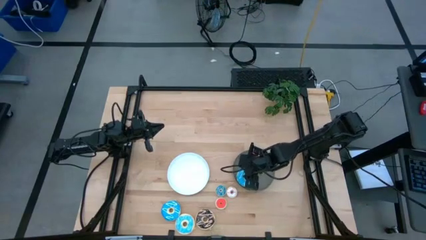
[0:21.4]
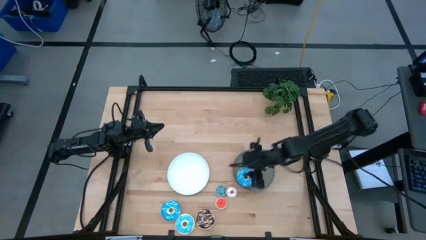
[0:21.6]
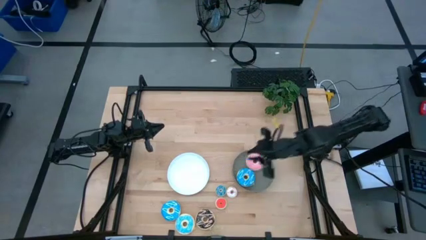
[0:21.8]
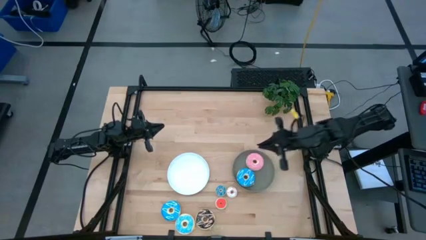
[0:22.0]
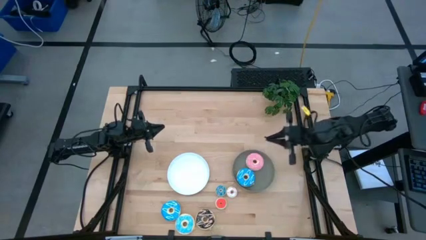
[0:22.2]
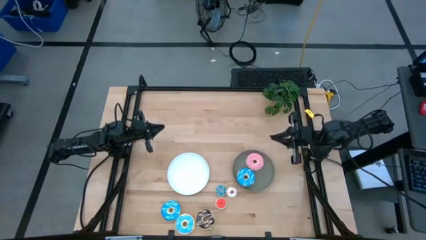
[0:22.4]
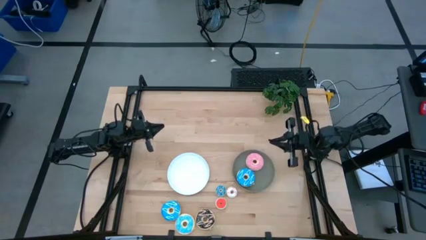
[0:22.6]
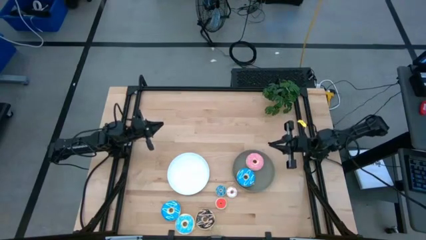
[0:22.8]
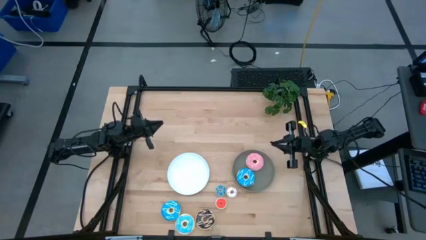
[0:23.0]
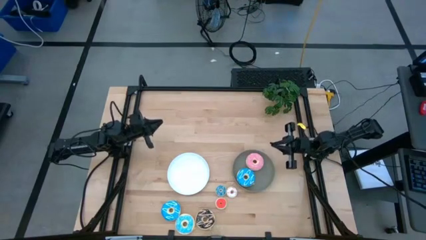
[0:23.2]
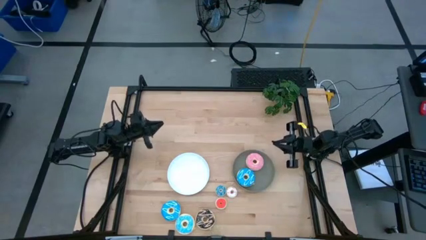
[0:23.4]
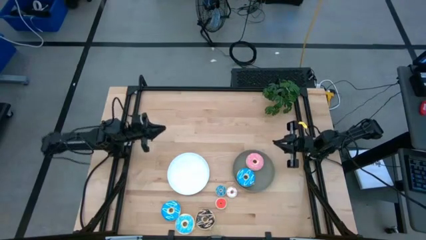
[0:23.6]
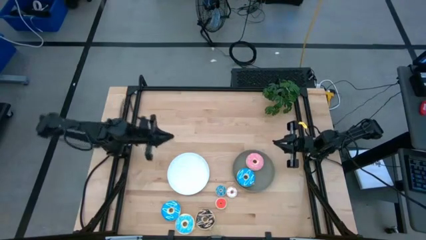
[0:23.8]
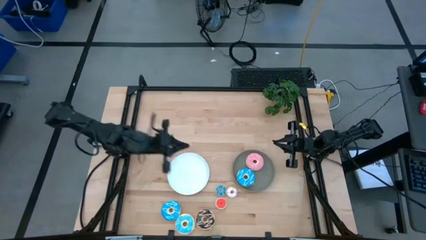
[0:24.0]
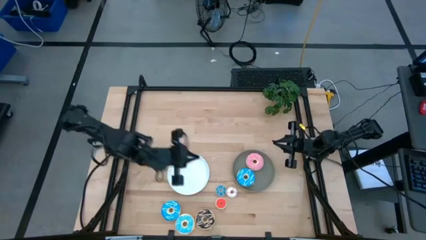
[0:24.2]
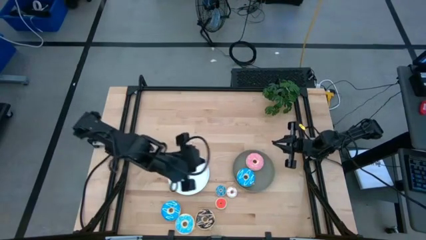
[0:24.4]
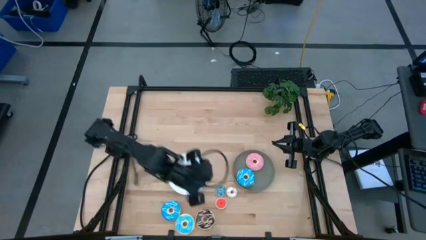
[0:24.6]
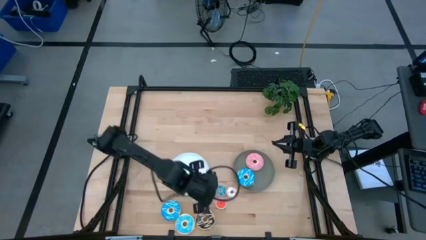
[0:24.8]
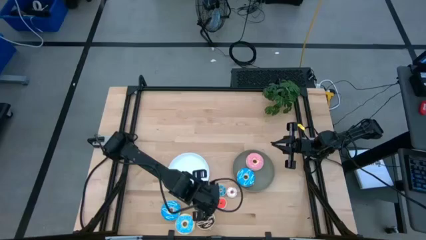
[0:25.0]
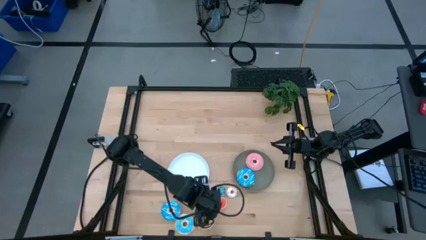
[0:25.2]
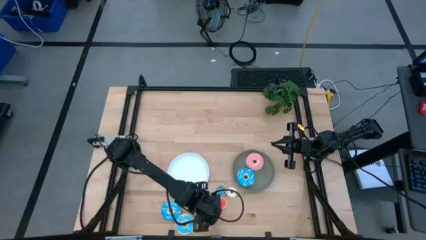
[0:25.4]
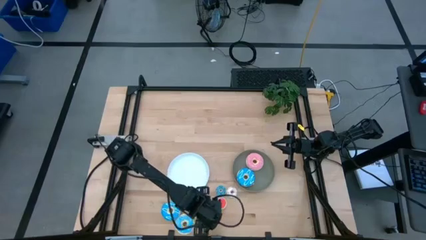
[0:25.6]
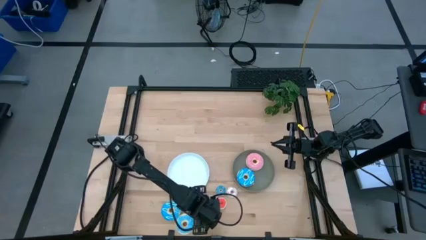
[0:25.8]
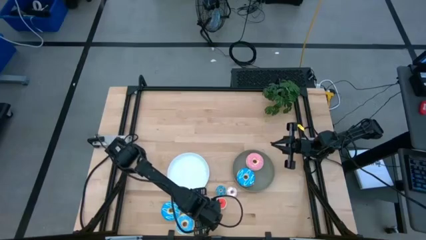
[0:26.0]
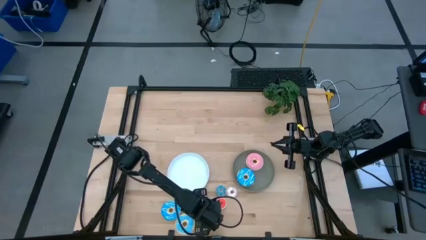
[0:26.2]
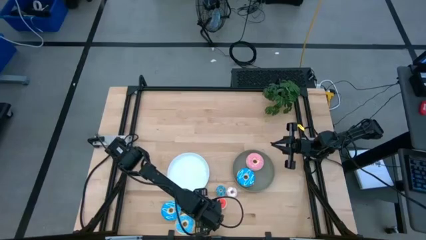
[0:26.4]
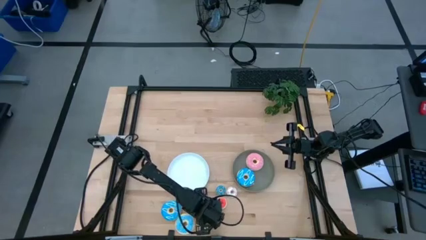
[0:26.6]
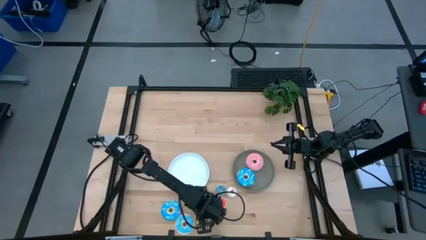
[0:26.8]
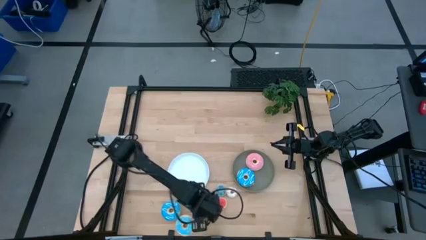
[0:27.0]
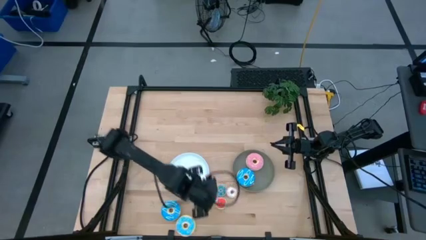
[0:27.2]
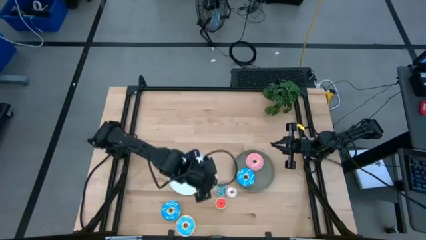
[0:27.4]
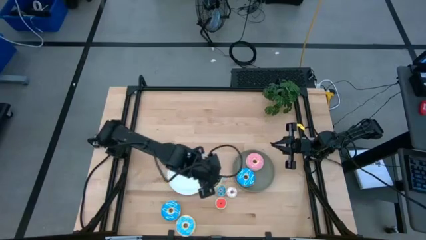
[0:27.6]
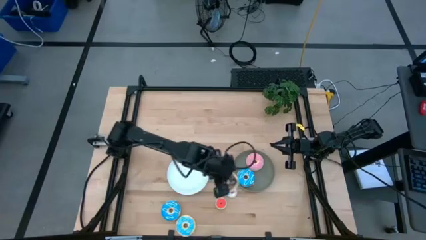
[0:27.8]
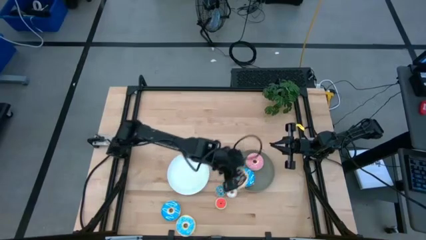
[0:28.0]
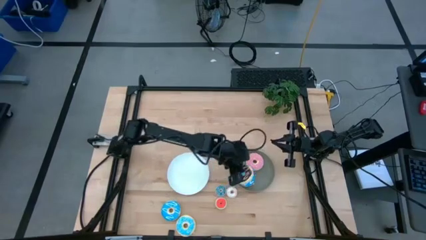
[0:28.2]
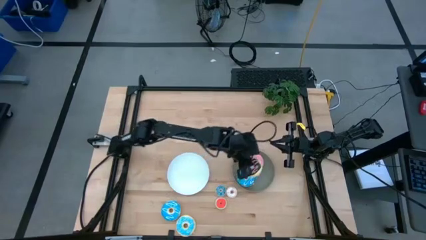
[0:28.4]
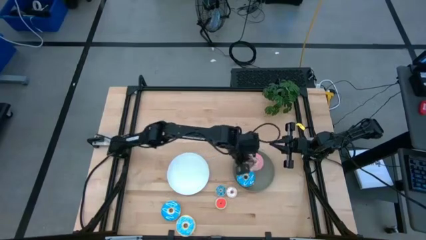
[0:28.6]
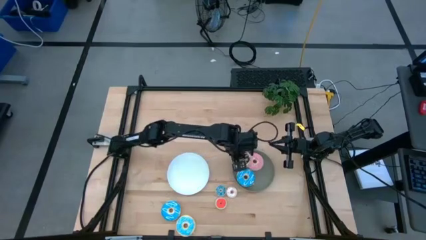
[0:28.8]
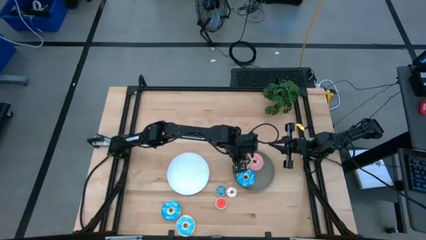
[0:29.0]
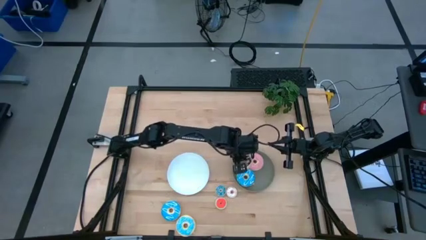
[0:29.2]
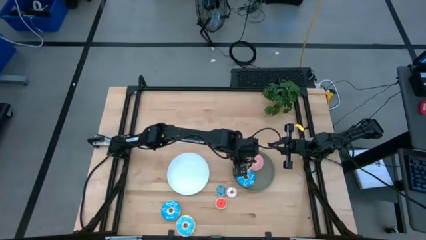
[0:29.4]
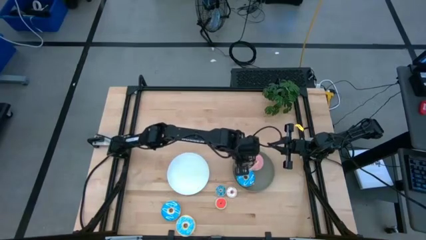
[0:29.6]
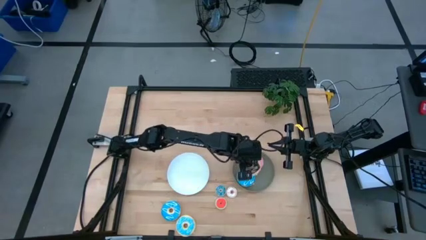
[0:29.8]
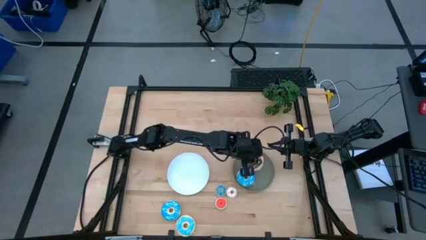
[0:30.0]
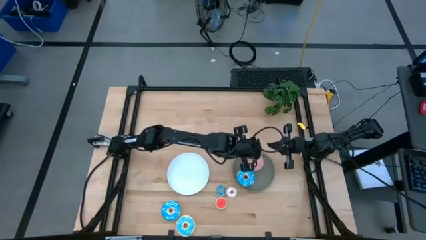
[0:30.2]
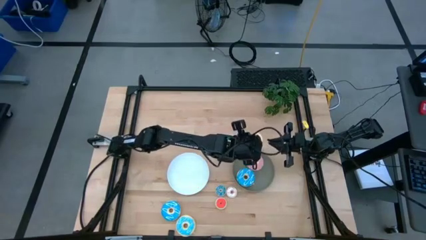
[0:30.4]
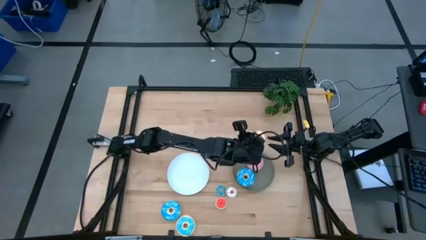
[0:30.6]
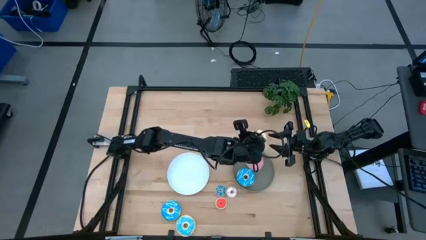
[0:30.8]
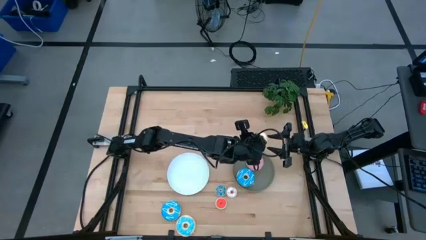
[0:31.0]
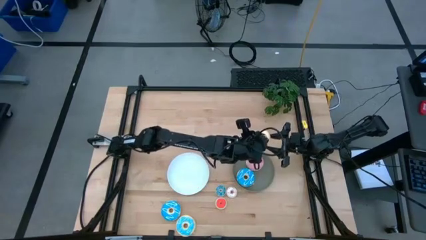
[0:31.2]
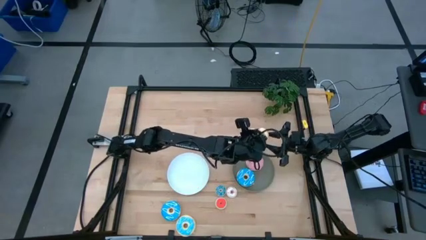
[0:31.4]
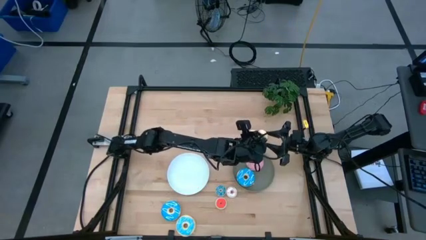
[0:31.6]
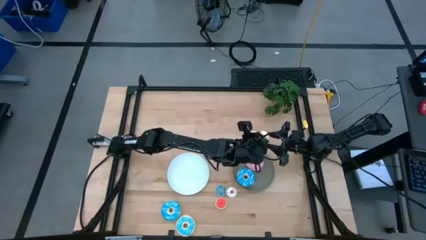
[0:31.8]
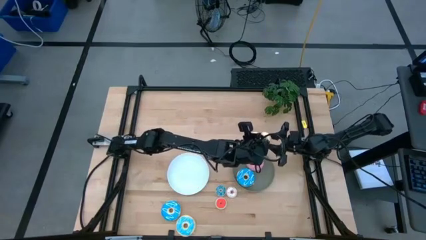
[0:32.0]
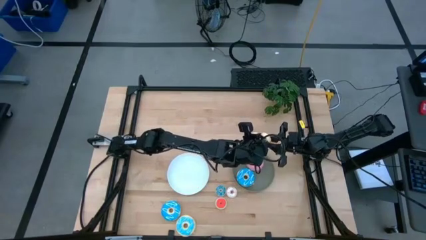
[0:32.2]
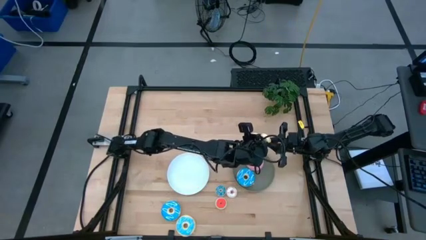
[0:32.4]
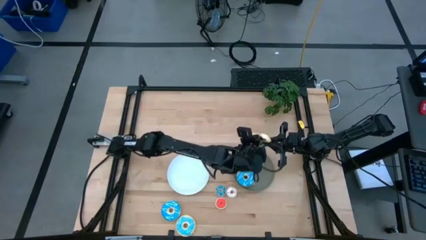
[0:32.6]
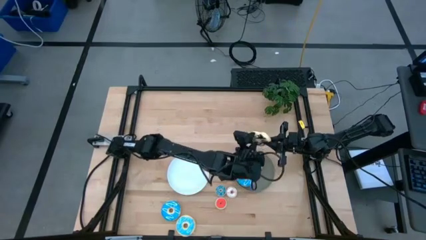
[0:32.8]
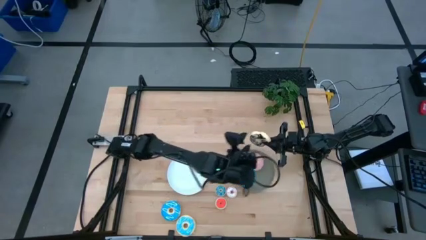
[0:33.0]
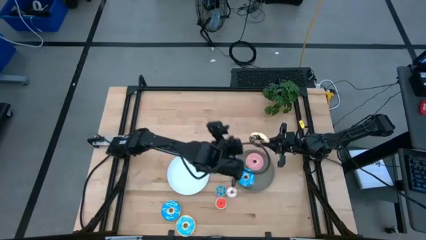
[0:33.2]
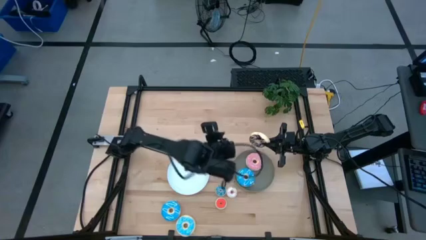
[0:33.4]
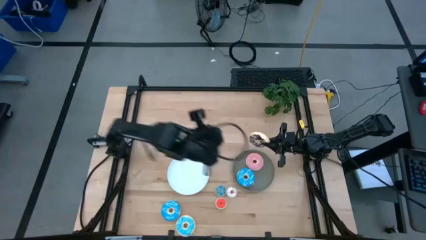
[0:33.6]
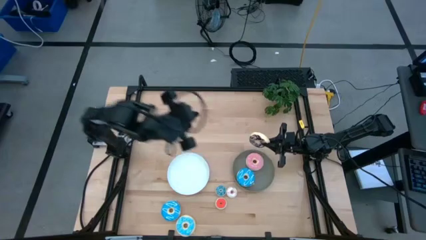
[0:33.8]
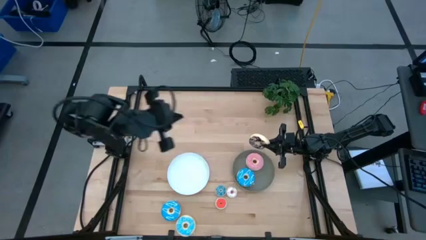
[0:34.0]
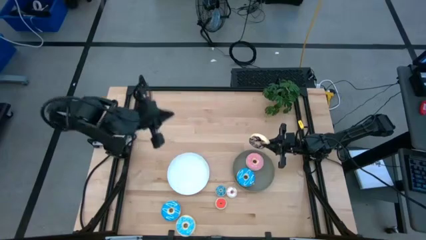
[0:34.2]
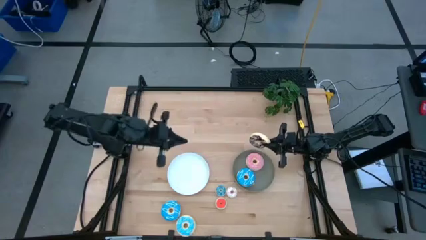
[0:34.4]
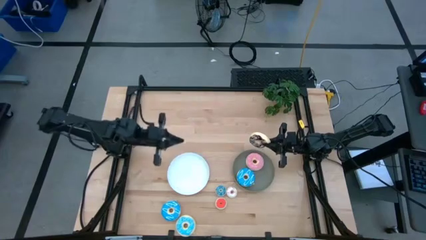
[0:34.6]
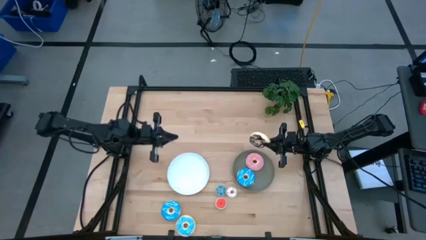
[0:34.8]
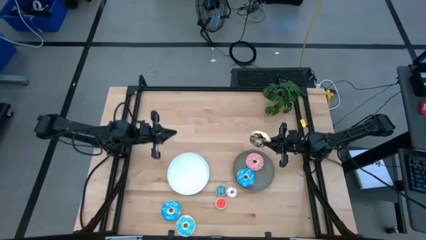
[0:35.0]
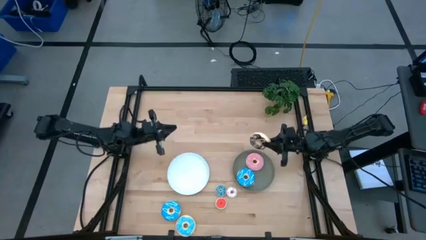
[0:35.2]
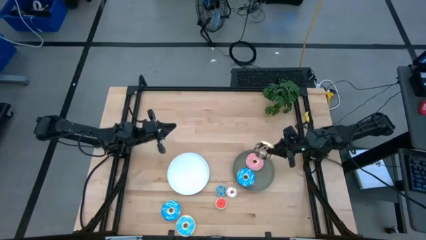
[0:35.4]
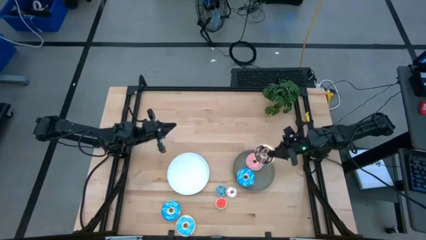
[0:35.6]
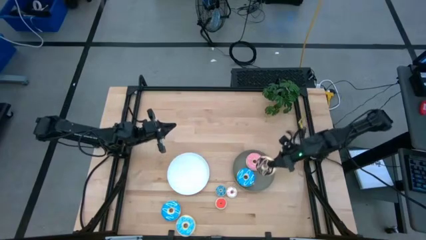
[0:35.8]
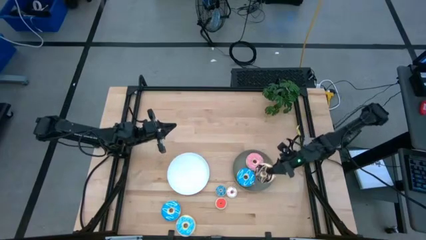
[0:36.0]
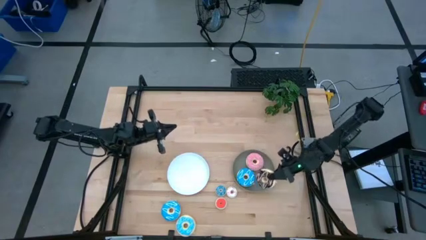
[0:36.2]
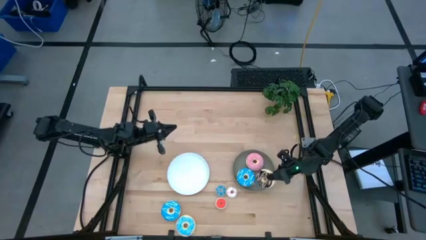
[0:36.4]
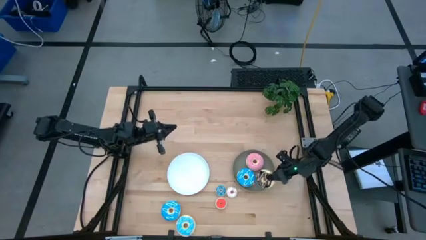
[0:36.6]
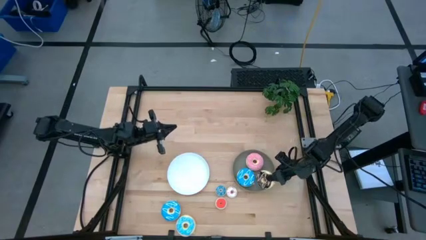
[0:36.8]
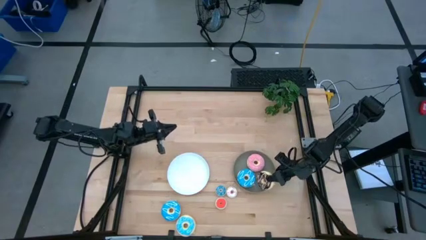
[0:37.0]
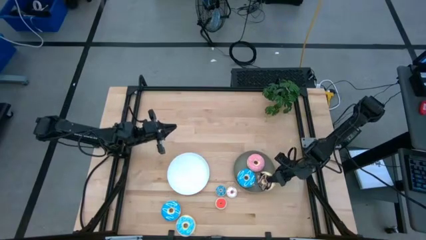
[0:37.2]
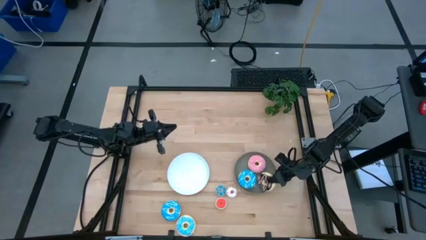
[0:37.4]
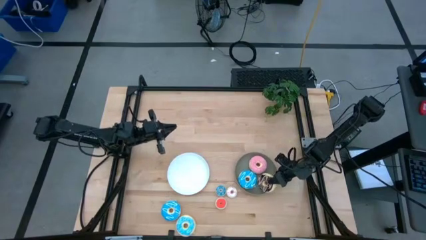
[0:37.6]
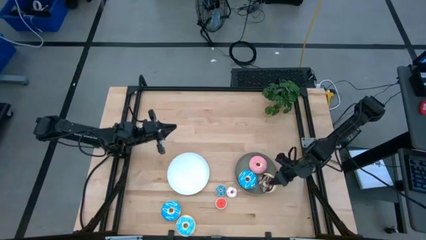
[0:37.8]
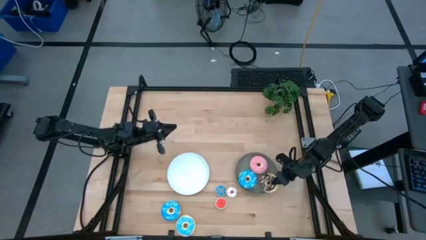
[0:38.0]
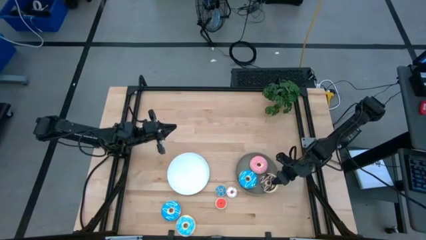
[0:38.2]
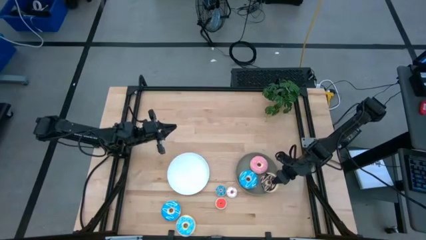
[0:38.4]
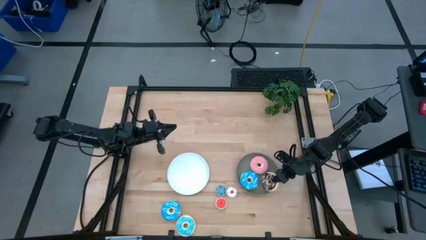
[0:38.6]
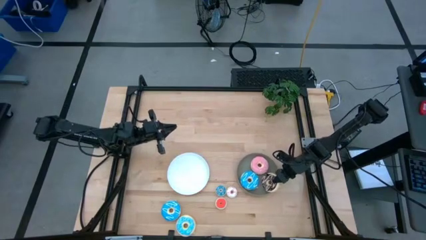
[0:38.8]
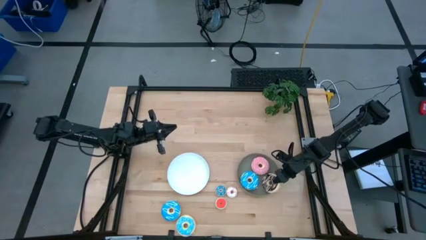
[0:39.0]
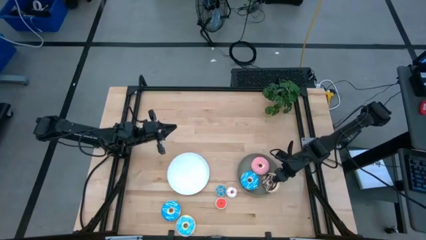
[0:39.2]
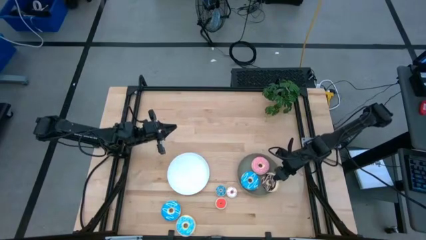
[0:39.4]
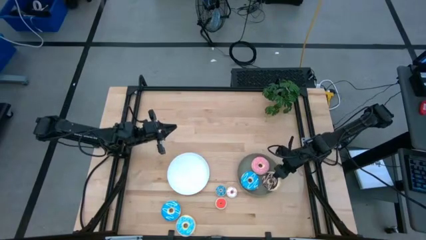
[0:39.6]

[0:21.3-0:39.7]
Task: Pick & Place donuts
Put the large black donut on the gray plate
